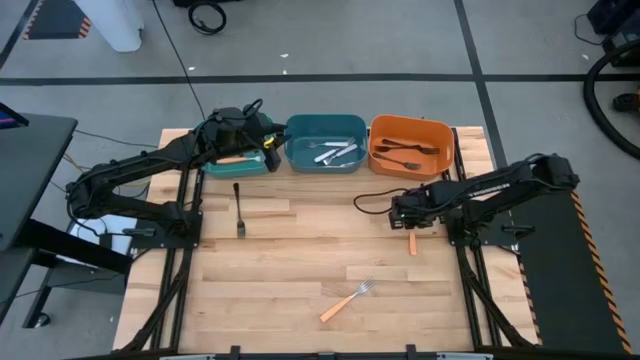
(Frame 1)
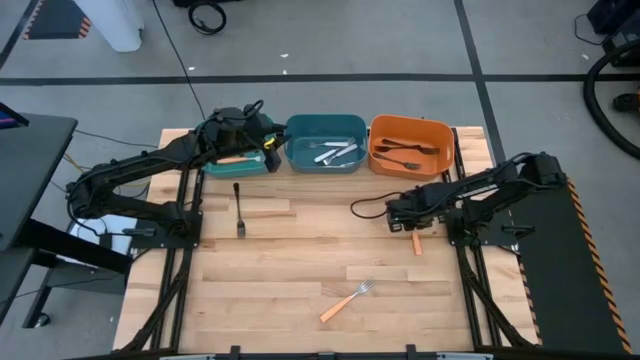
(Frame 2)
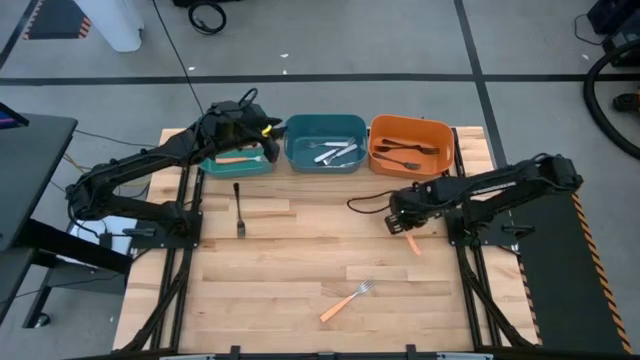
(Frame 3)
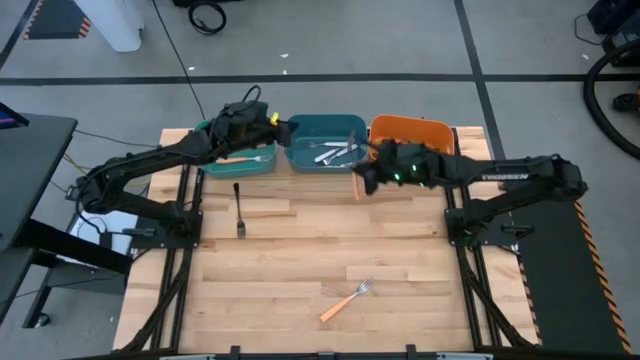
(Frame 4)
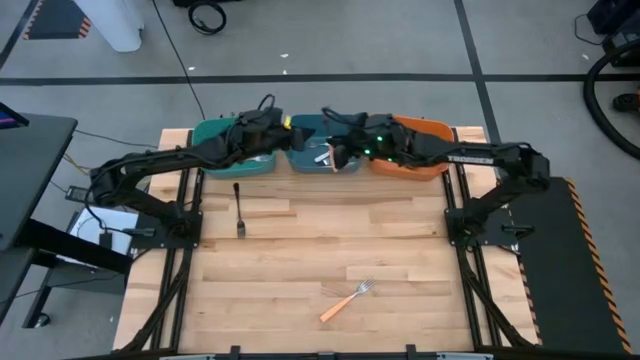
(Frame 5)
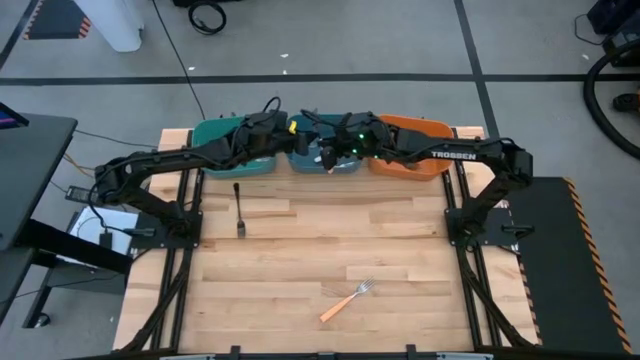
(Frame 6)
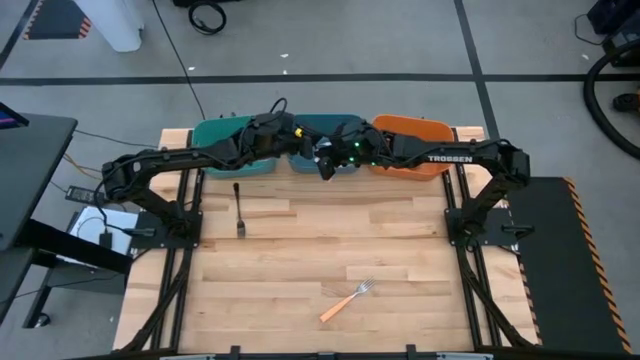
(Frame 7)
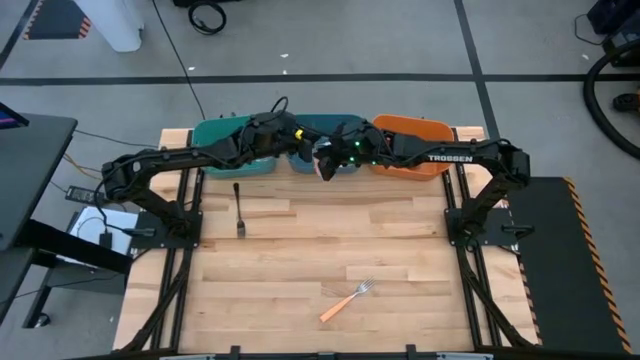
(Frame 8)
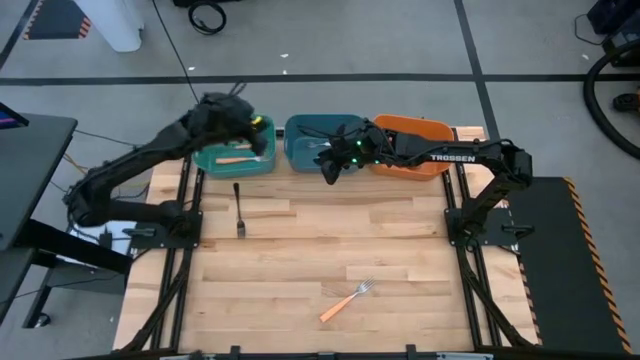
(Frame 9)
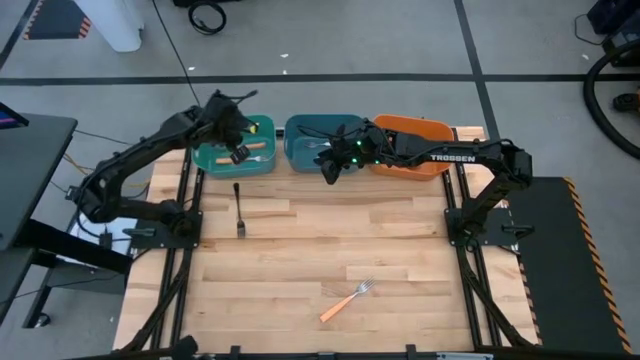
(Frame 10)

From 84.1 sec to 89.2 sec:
Task: Sort silverware by color (type)
Put the orange fork into the green bin

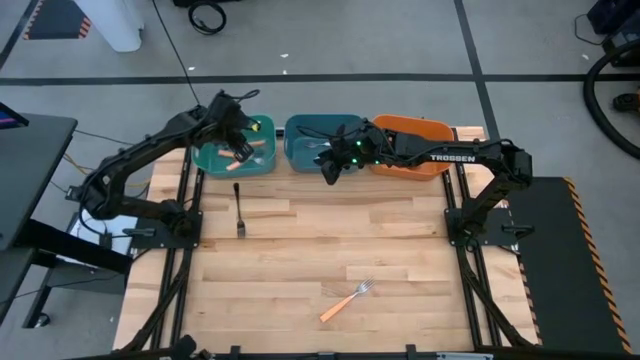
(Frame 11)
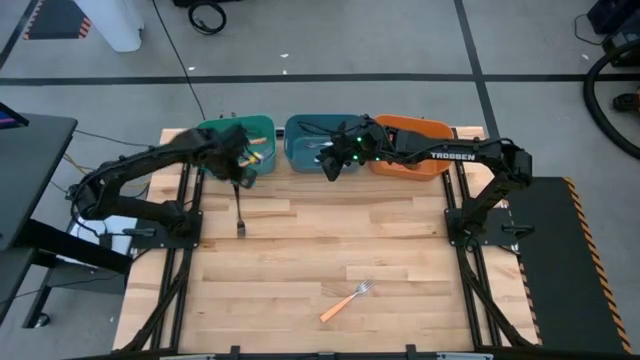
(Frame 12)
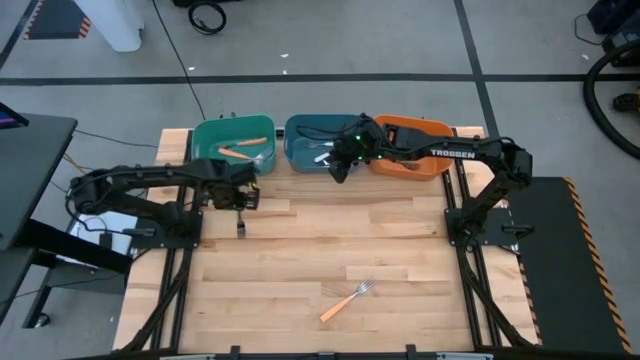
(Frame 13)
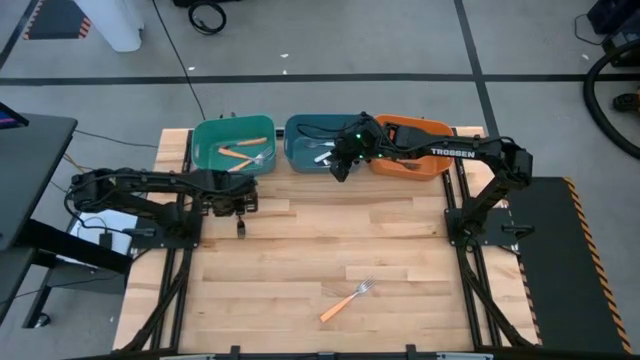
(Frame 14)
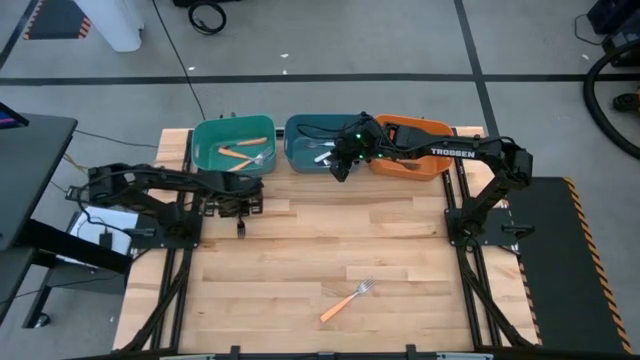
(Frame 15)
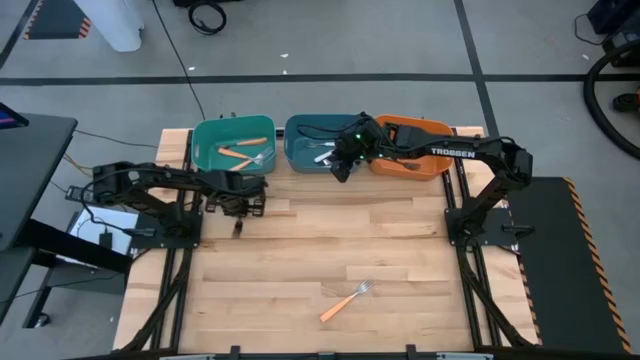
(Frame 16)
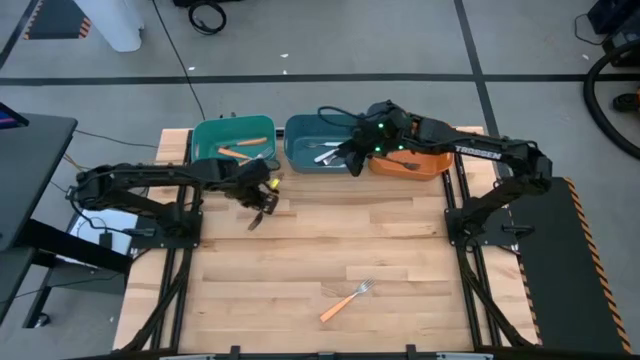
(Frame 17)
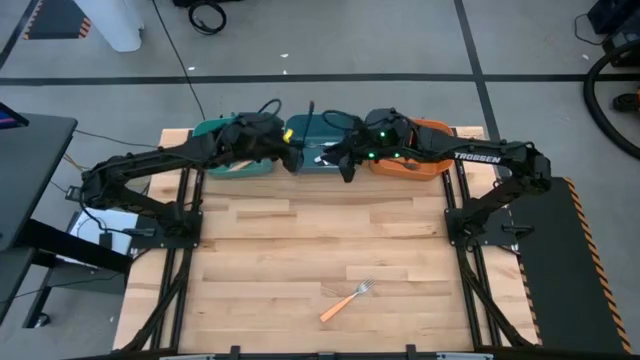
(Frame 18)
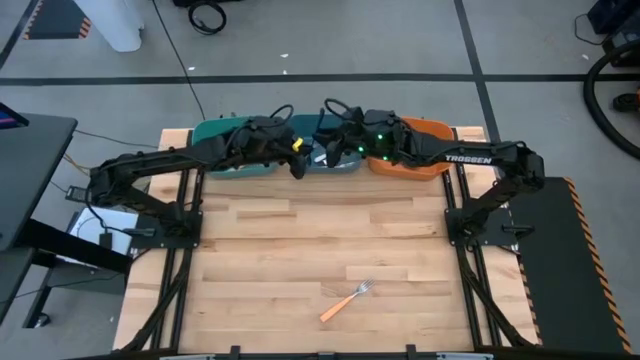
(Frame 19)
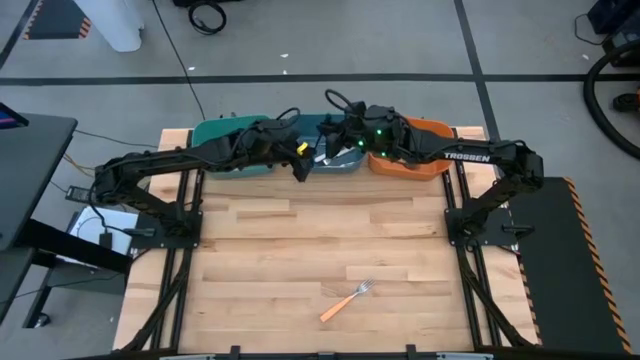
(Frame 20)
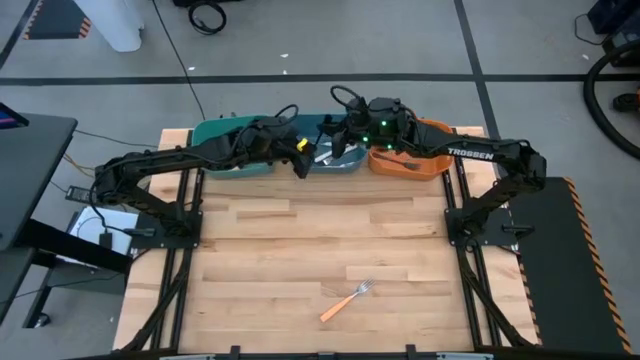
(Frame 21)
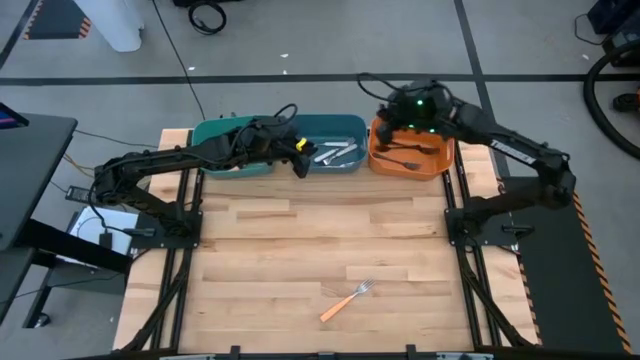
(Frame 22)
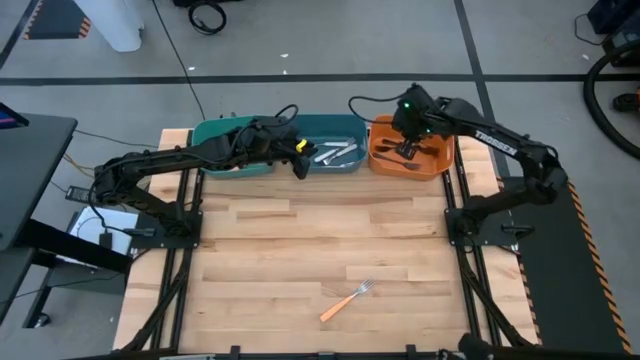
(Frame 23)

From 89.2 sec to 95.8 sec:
Put the black fork into the orange bin

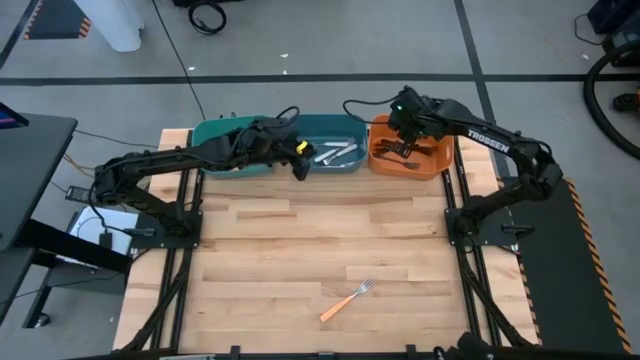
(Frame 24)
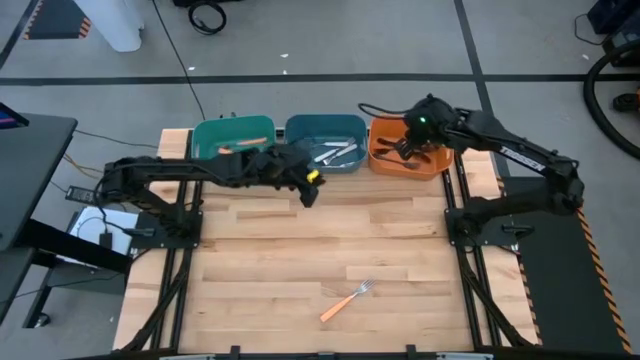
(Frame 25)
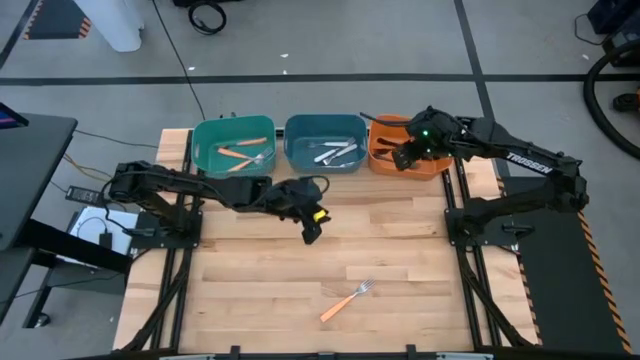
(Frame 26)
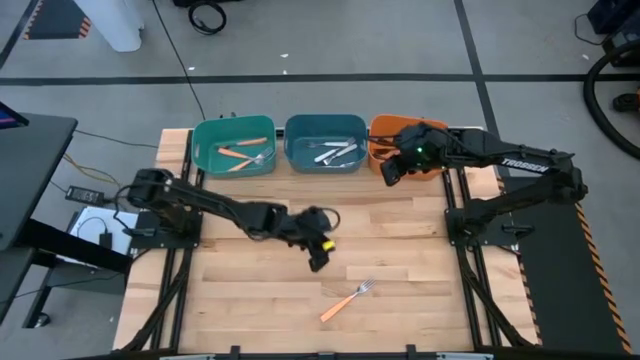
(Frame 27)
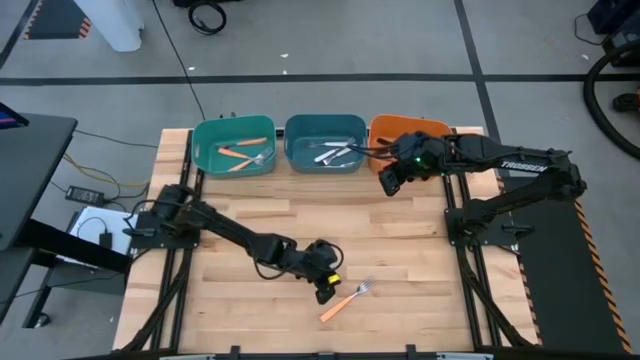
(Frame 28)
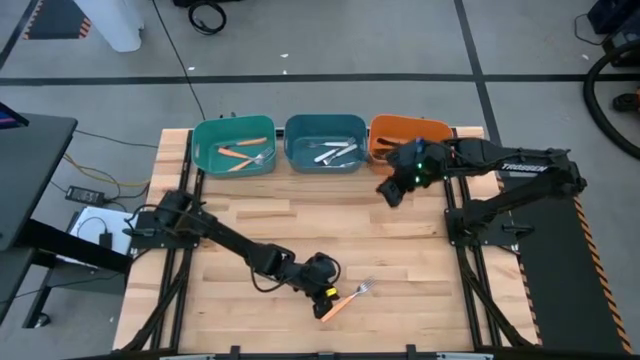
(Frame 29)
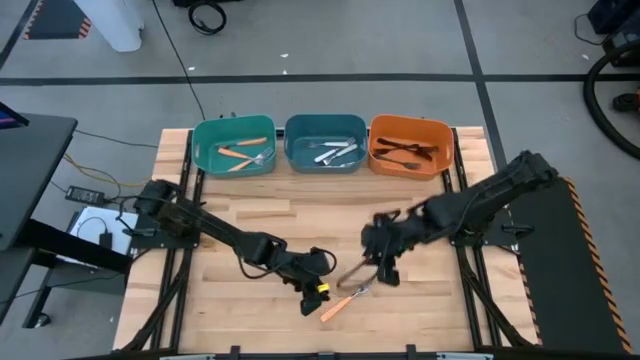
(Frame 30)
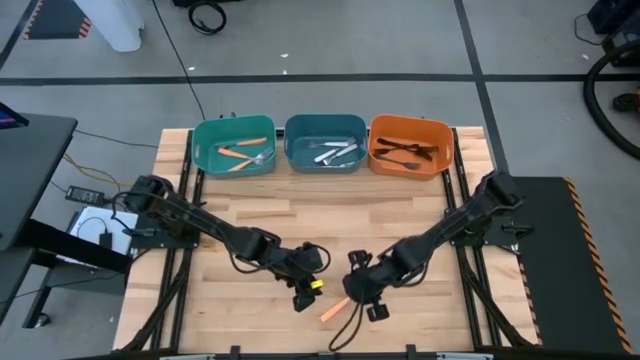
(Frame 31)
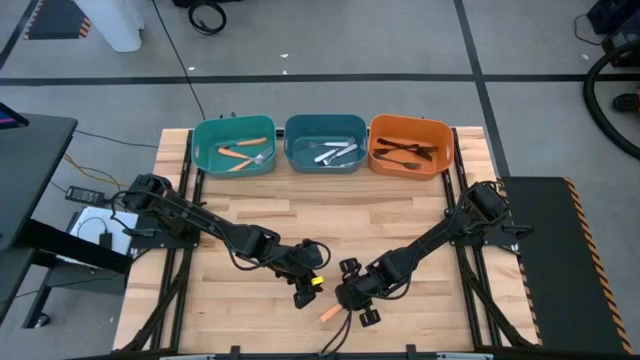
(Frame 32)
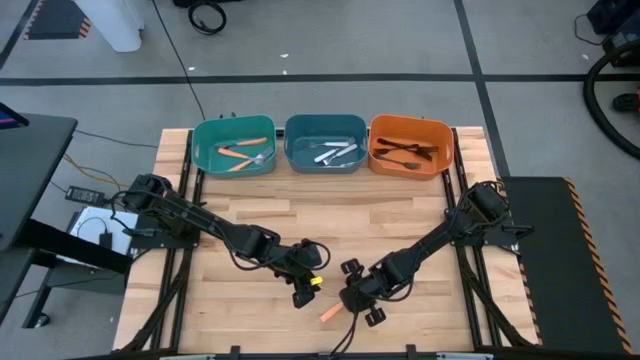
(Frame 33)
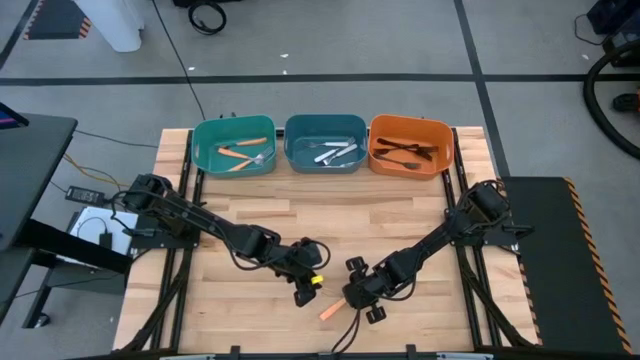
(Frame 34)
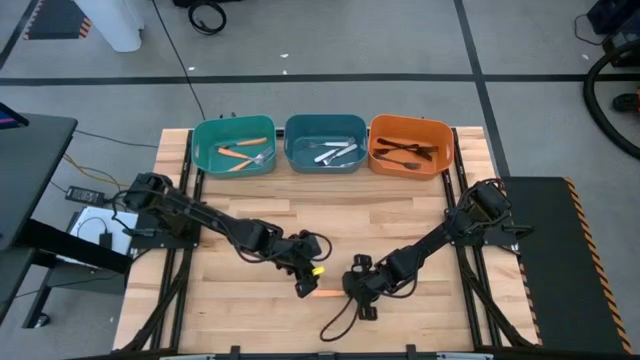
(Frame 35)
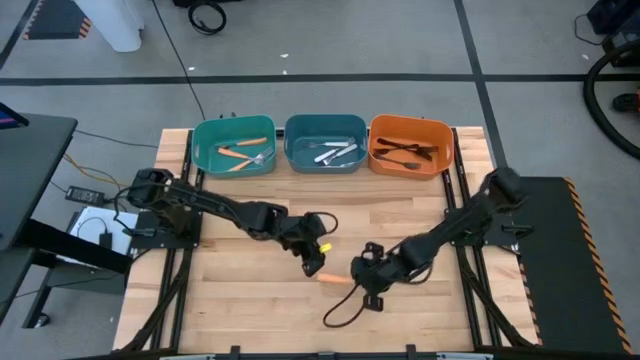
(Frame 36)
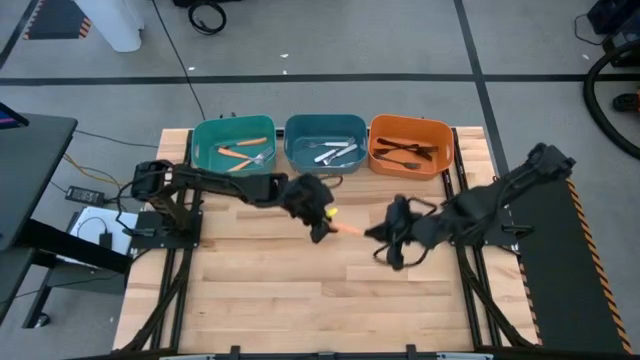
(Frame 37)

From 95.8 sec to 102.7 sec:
Put the orange fork into the green bin

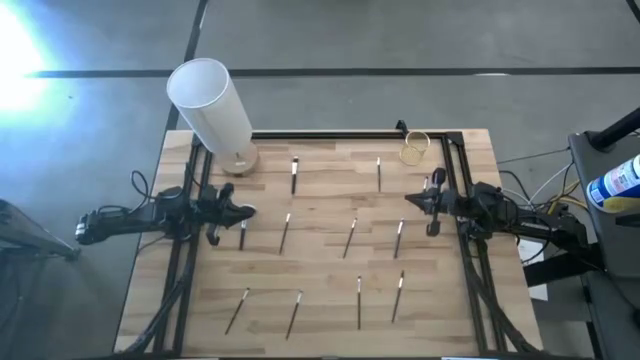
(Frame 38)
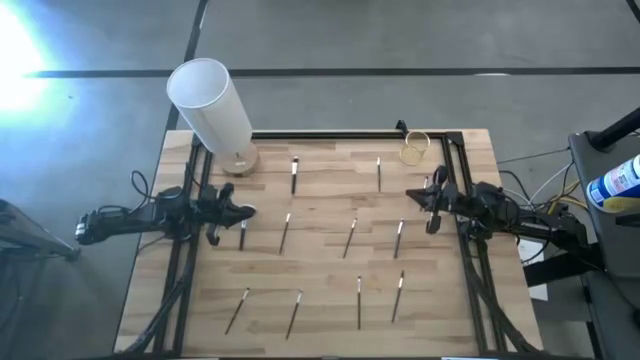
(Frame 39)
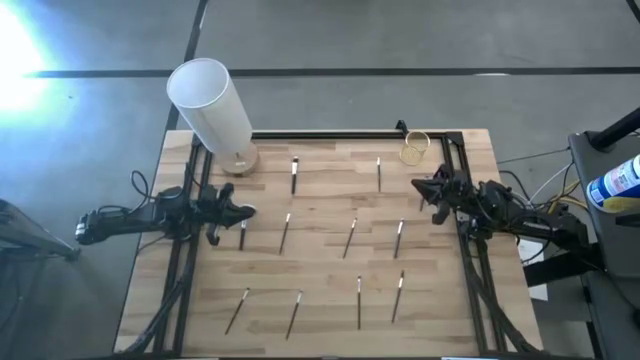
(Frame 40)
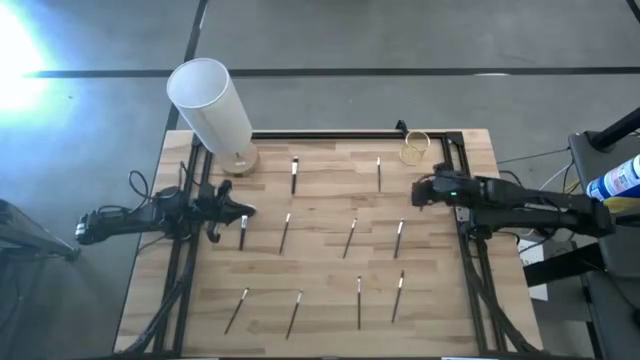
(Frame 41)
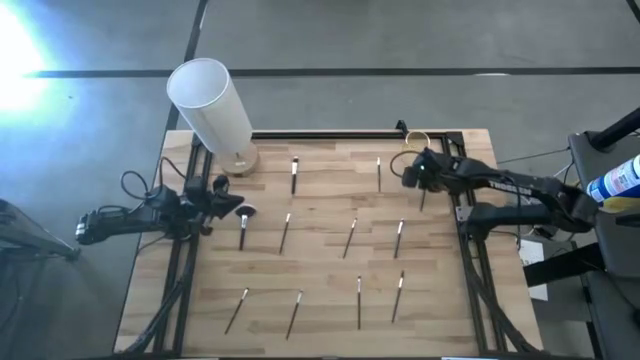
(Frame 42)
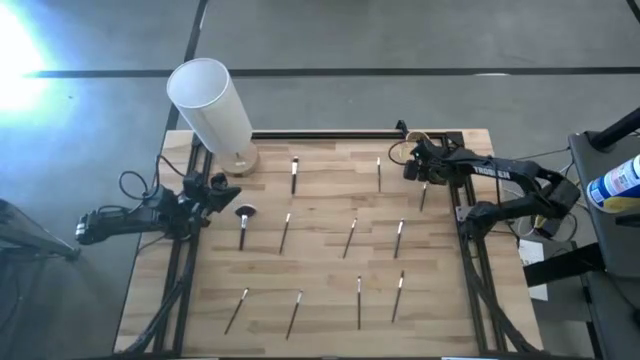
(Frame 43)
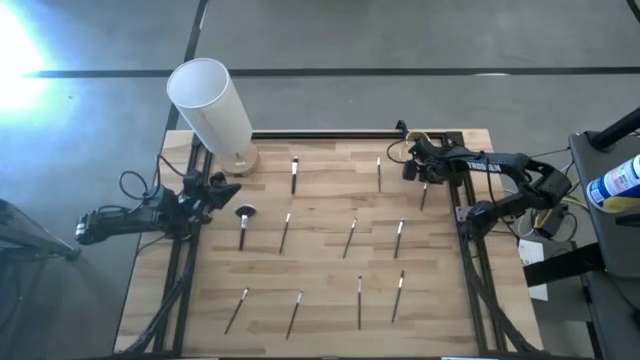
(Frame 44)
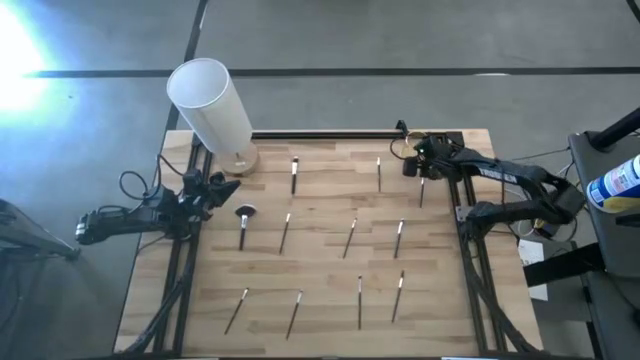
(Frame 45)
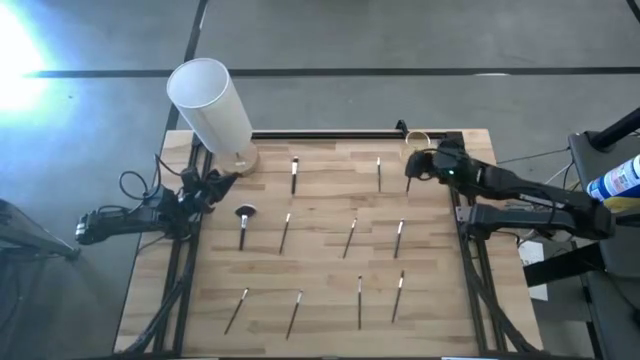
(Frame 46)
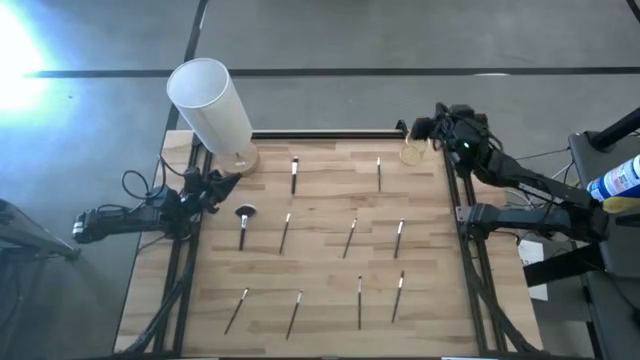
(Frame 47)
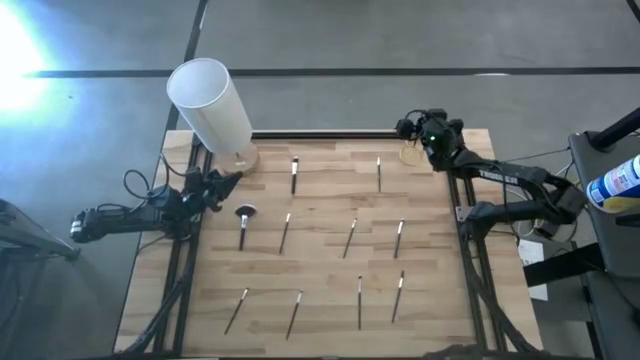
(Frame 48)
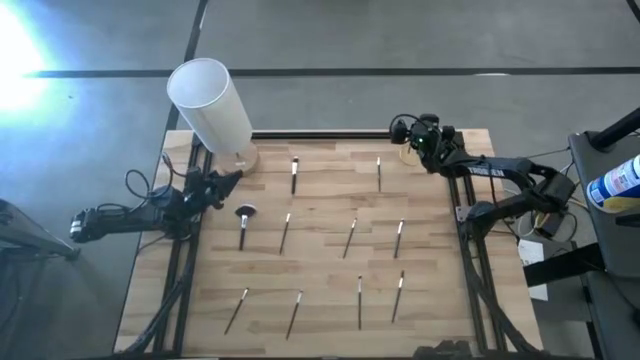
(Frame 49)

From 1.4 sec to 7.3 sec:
Task: Put items in baskets/containers
Put the eyeshadow brush into the yellow container
